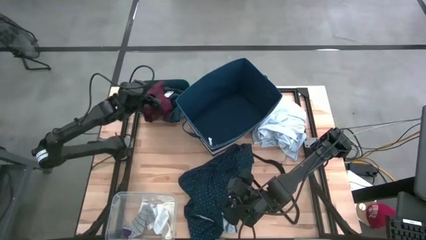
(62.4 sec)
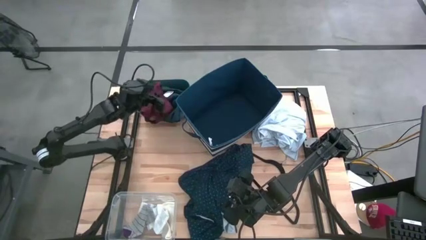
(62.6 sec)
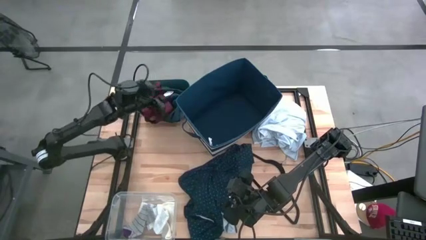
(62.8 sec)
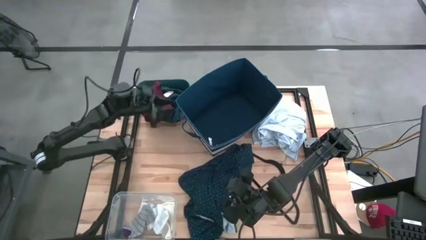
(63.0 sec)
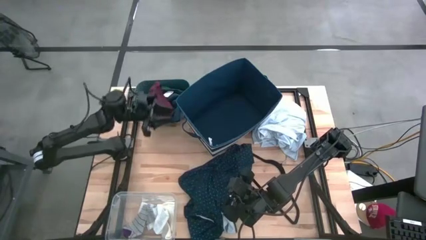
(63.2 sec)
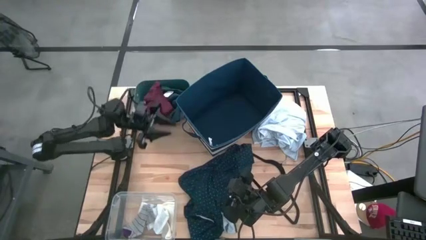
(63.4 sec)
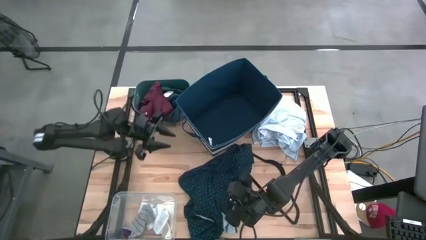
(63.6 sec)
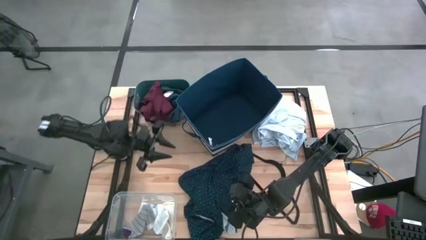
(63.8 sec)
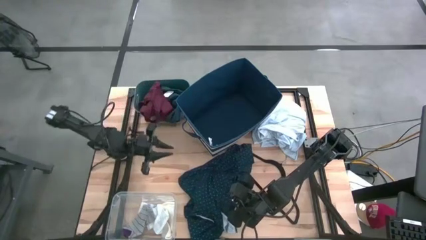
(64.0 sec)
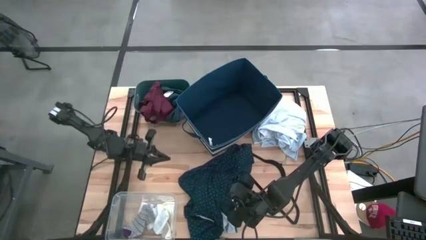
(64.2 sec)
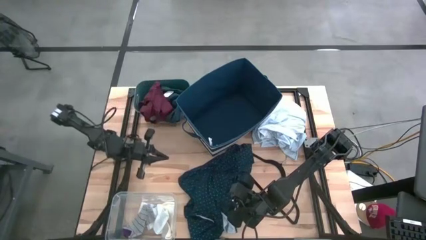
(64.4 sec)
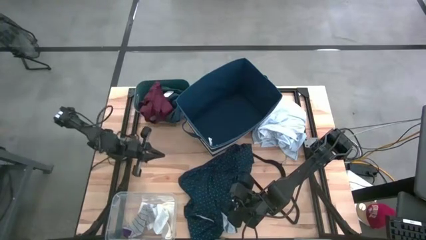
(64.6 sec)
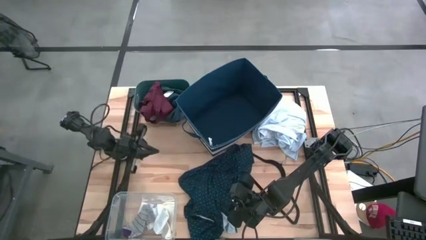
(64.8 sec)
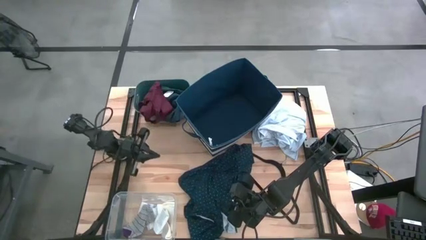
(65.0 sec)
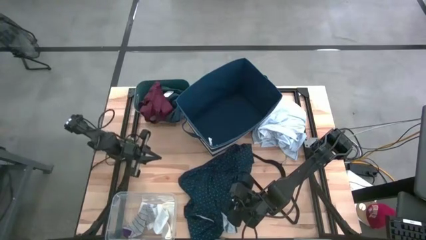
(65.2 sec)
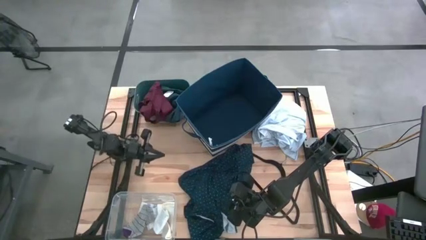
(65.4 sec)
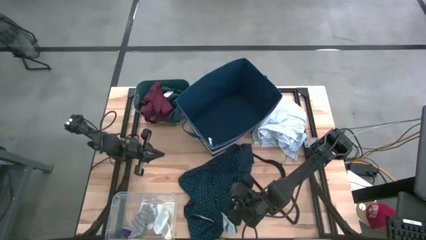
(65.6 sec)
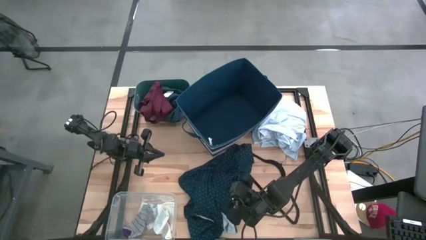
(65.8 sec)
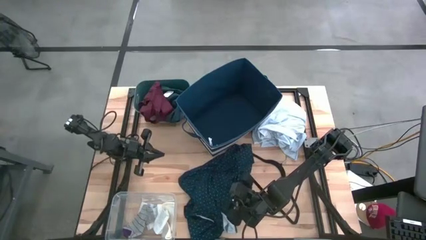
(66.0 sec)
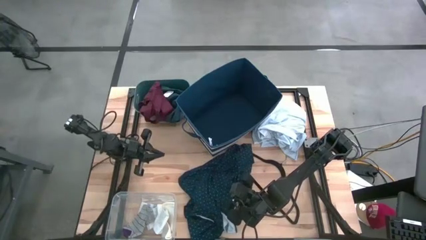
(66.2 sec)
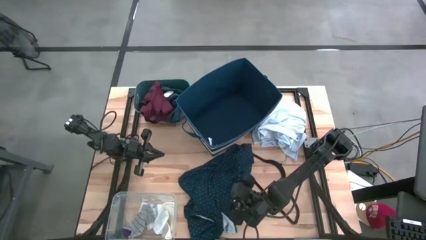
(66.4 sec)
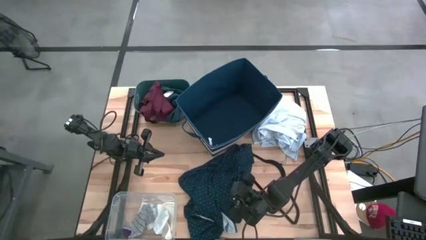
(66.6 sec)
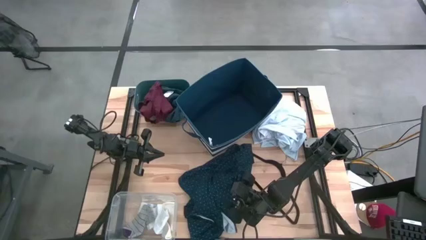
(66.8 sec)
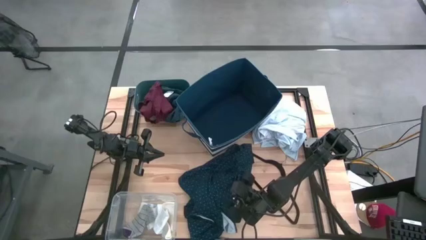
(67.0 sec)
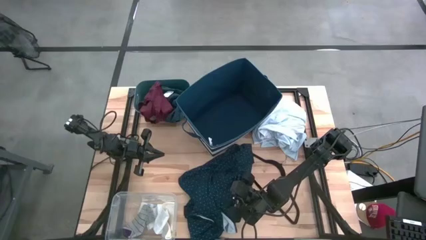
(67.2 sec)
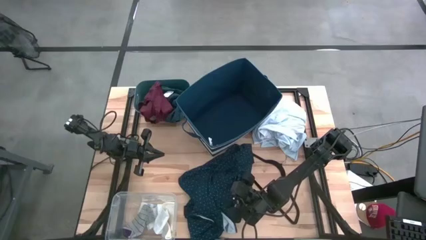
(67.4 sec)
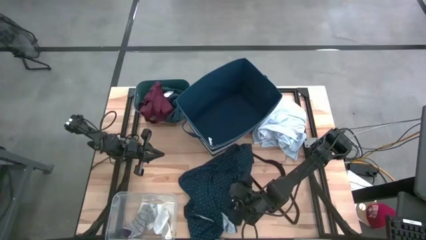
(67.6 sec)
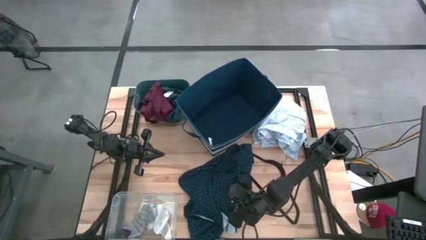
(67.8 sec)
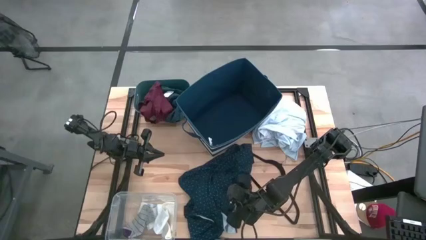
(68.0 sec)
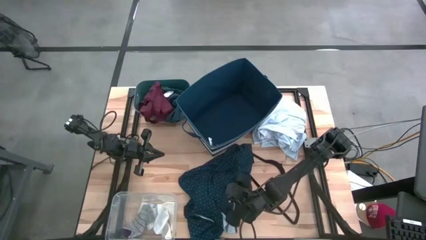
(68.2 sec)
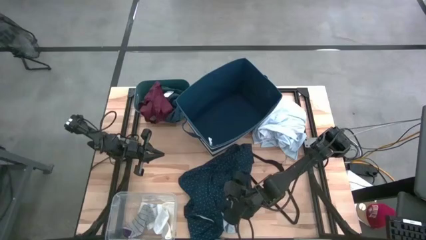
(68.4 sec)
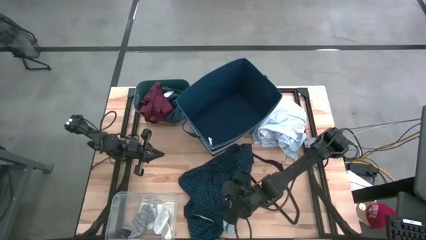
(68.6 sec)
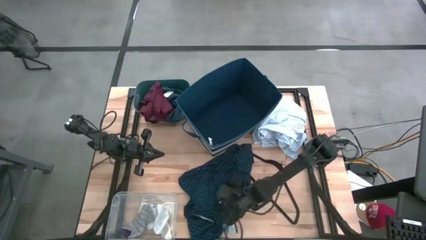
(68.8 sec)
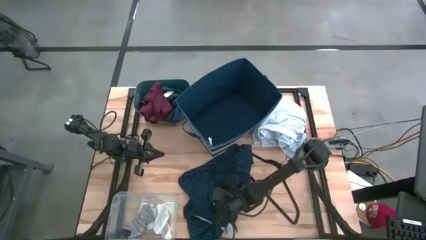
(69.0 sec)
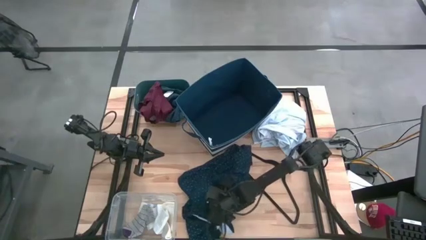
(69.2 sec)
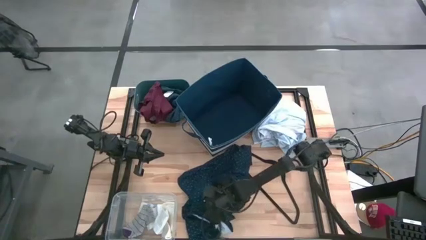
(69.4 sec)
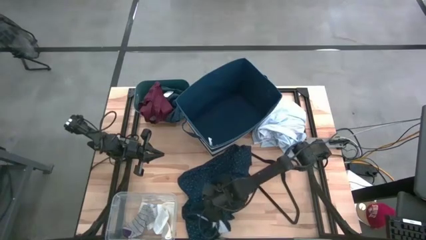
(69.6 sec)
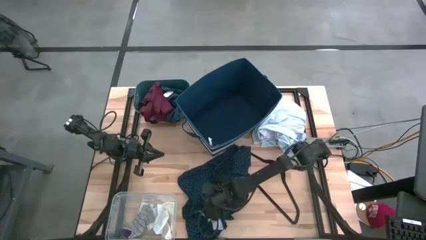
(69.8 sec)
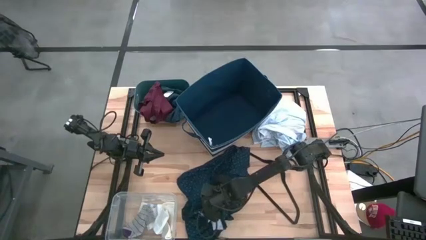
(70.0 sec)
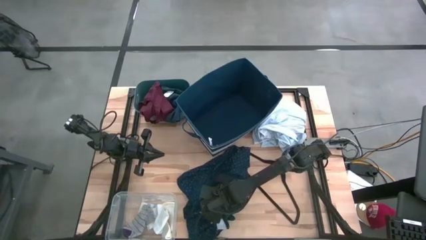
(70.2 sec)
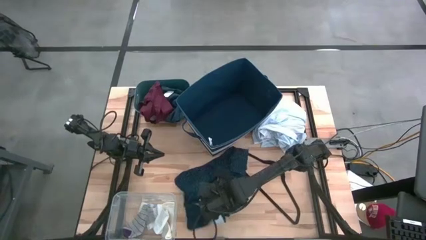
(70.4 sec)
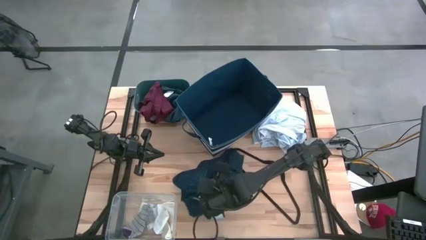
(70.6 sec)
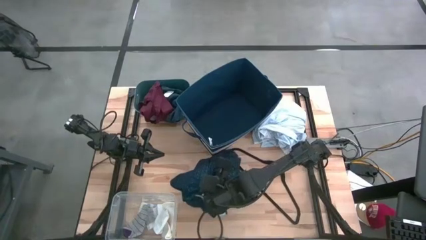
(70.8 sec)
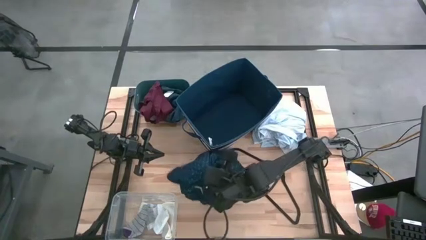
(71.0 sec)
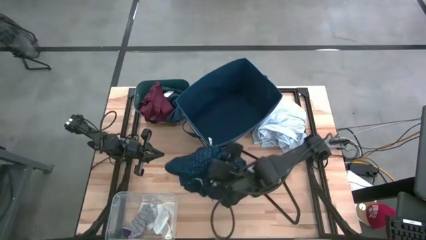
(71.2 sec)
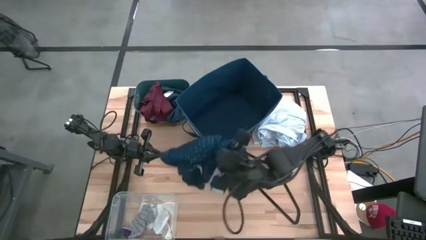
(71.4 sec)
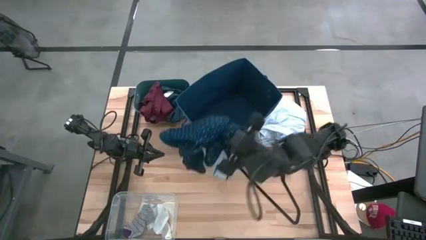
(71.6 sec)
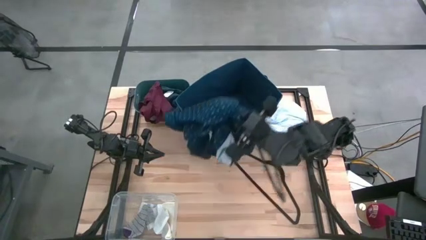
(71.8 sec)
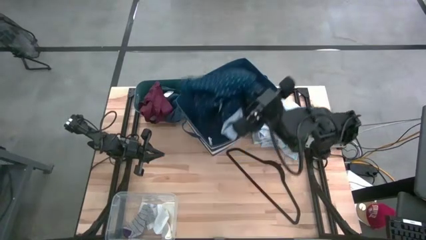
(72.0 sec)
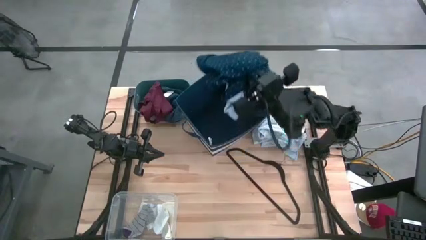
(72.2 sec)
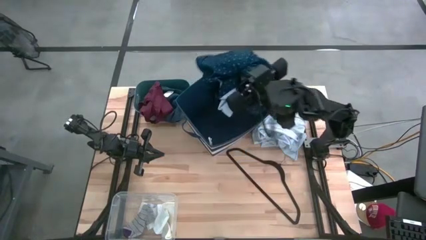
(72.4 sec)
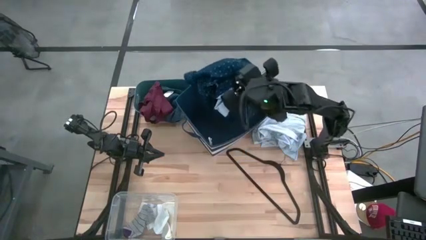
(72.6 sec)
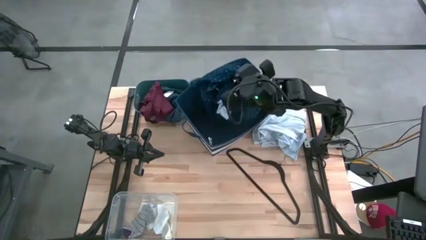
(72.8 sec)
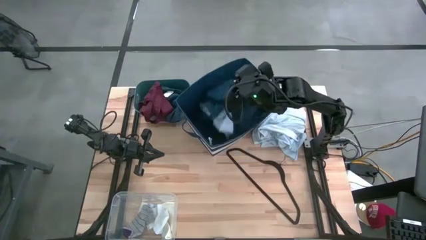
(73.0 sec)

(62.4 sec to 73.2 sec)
Task: Pick & Place Cloths
Put the blue polo shirt into the laundry organizer

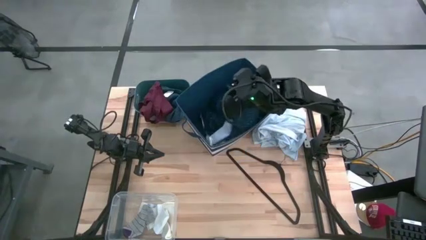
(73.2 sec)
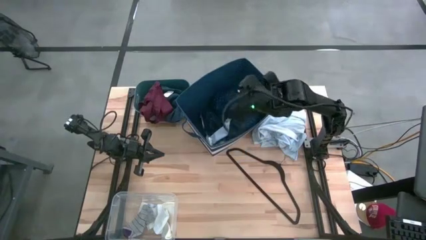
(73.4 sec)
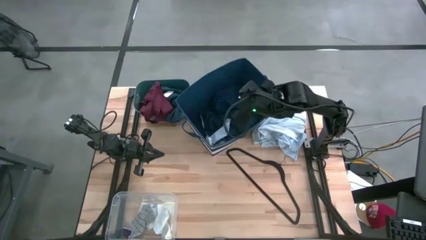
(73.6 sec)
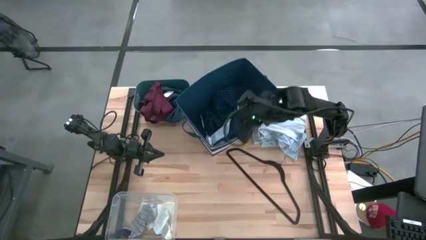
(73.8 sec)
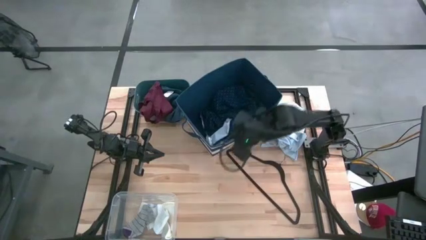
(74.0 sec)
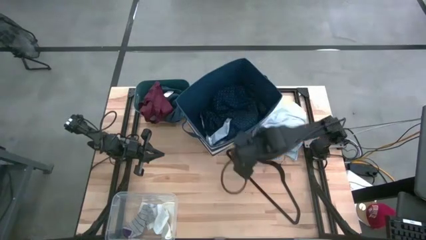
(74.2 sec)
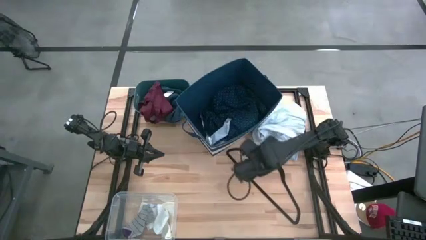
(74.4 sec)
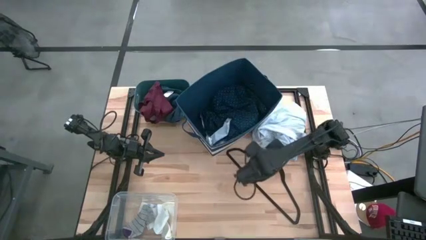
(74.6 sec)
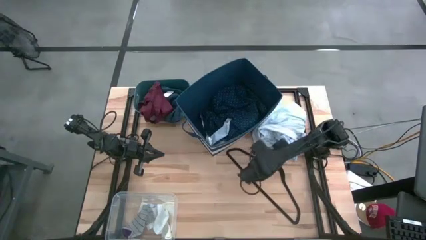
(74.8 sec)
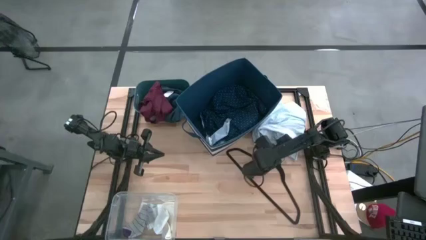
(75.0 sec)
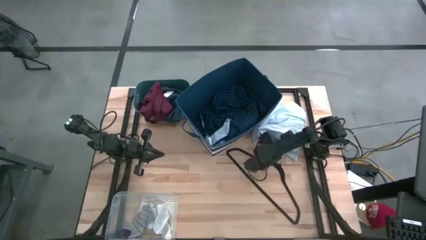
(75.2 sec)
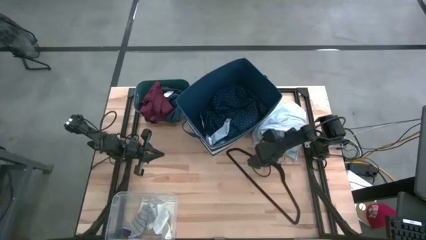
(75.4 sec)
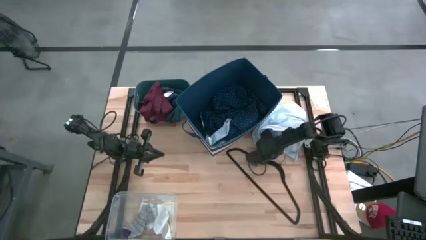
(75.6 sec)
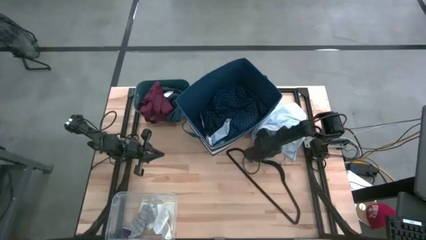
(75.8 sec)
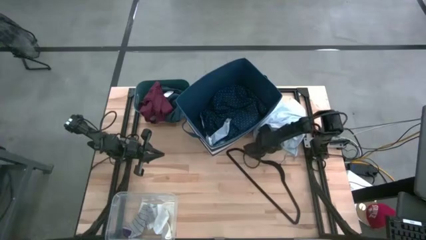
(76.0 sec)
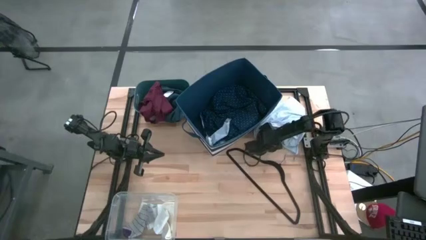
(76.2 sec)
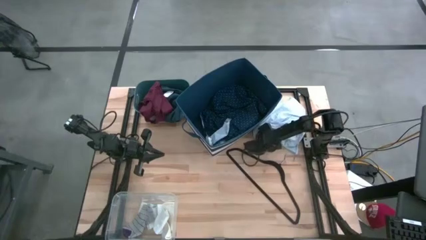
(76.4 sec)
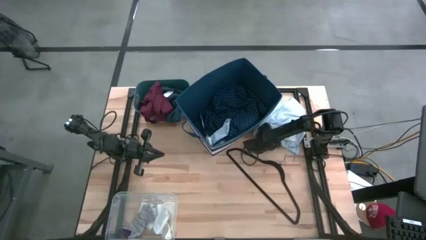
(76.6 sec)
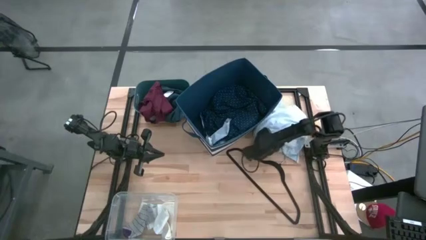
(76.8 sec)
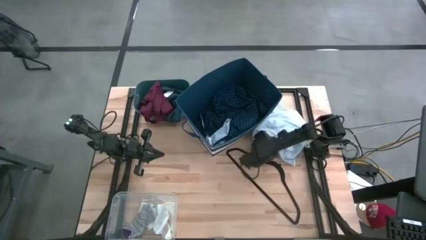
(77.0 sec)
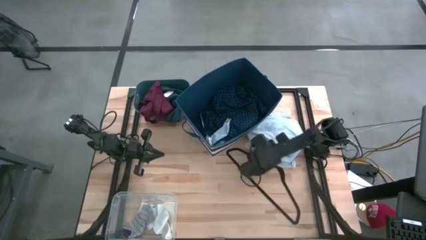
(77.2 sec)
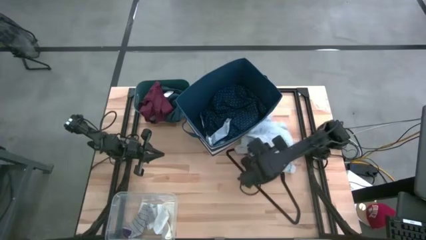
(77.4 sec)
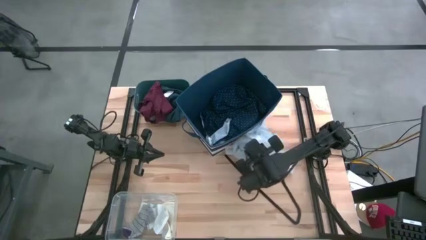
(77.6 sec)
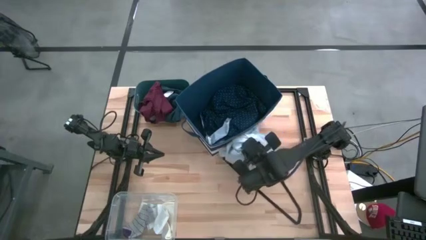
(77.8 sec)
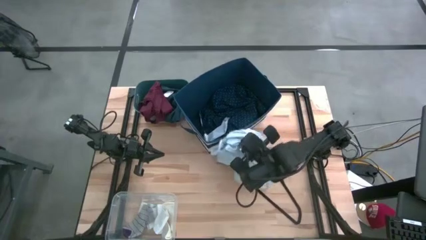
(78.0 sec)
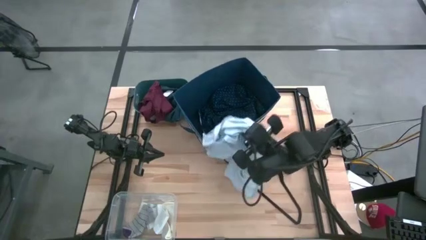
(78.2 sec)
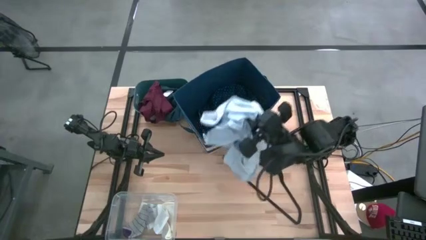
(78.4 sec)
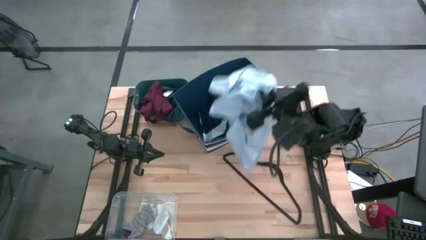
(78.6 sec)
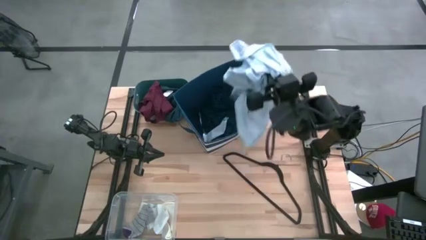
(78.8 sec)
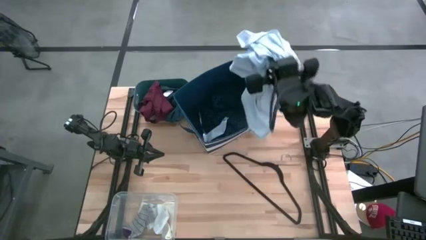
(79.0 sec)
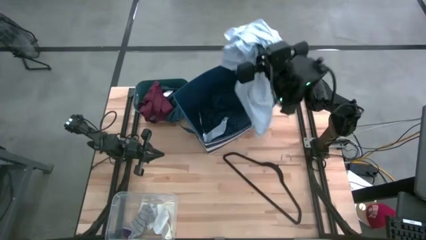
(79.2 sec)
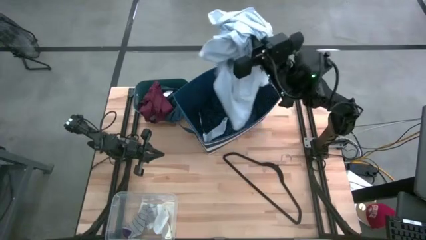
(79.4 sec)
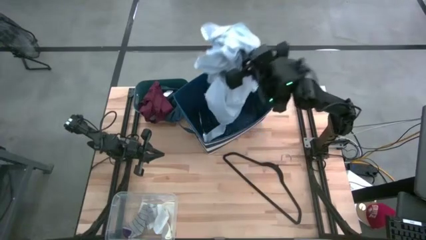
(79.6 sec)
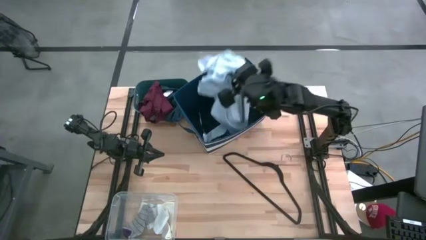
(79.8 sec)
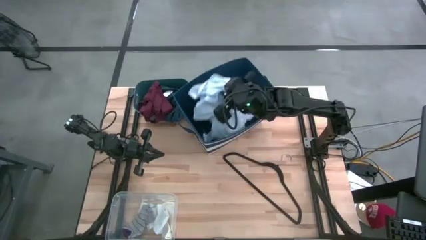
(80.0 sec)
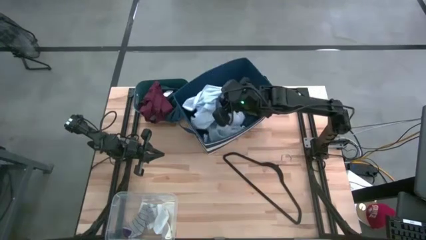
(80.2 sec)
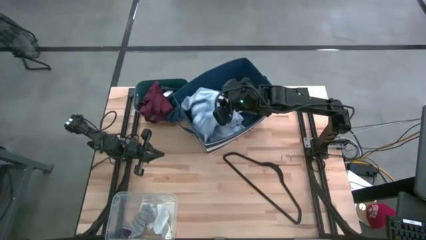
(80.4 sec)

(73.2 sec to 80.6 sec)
Put the white gray patterned polo shirt into the laundry organizer
